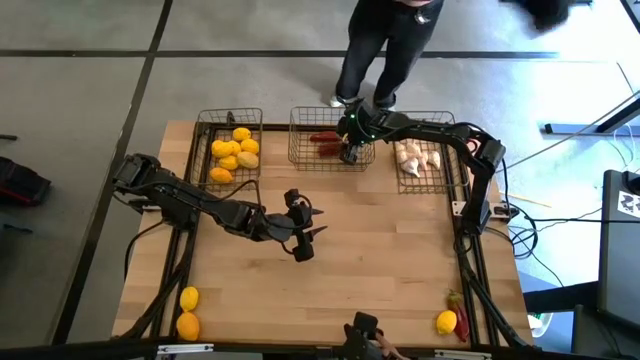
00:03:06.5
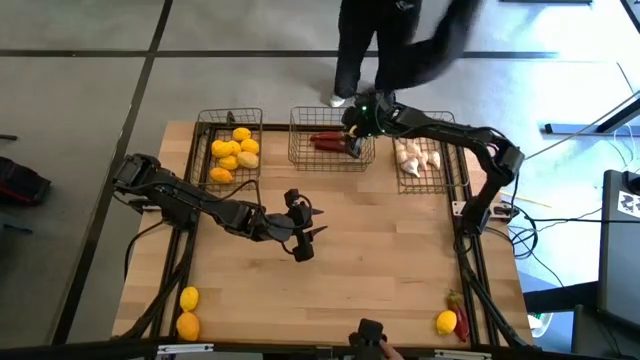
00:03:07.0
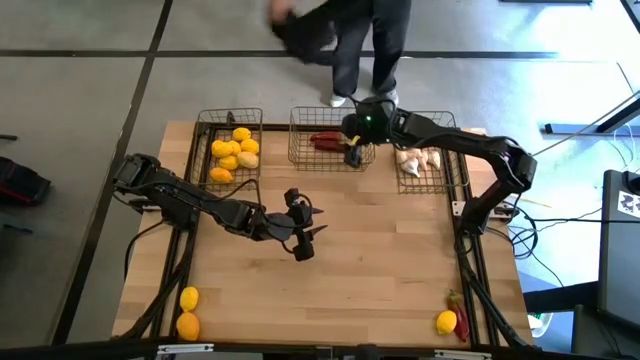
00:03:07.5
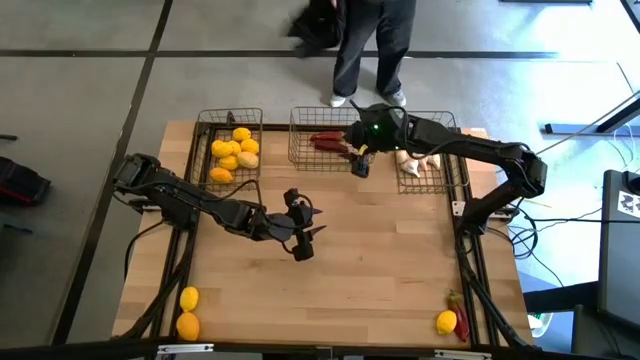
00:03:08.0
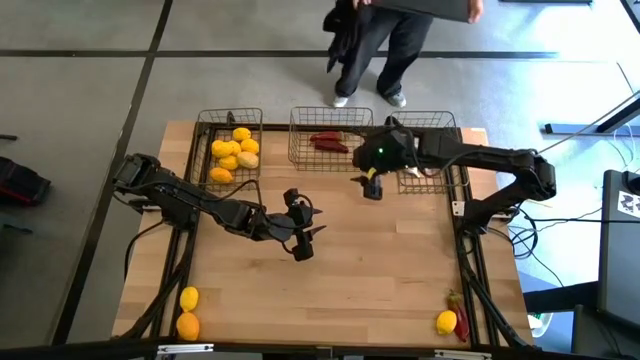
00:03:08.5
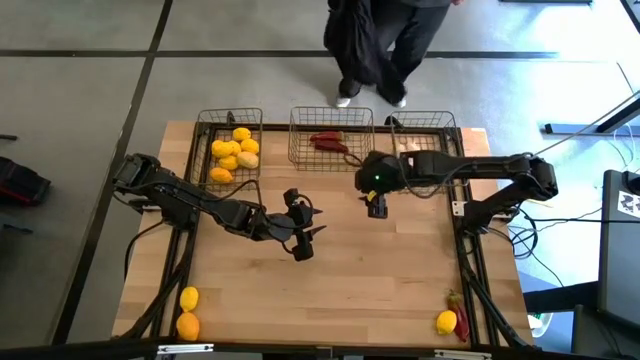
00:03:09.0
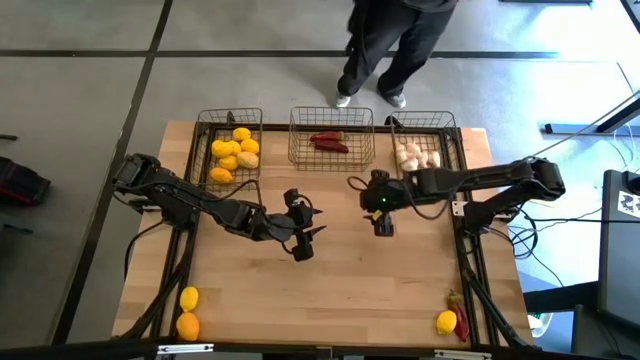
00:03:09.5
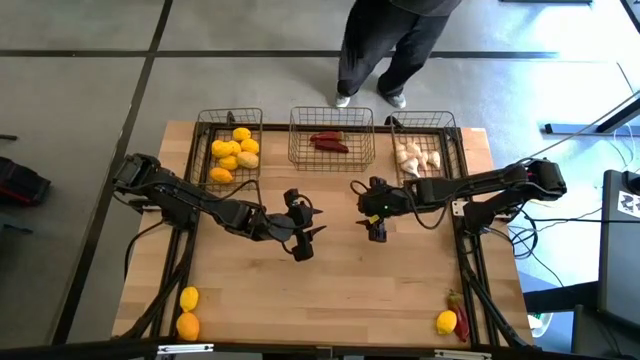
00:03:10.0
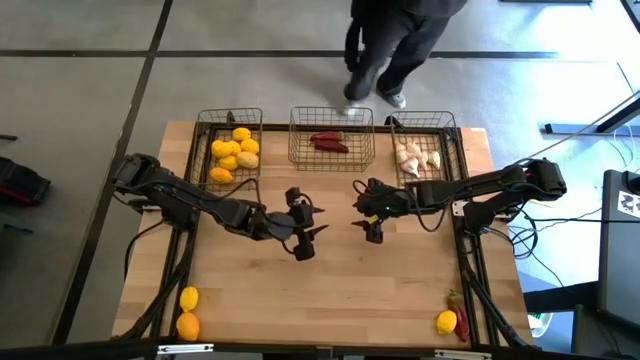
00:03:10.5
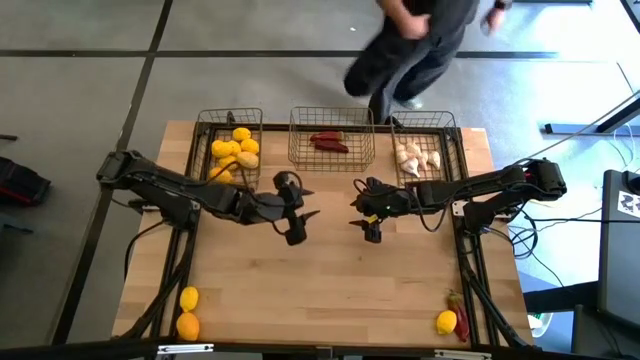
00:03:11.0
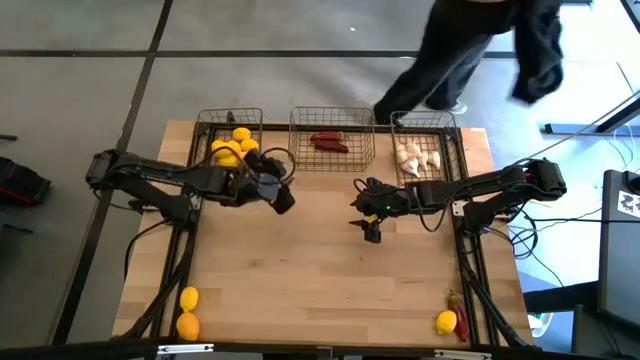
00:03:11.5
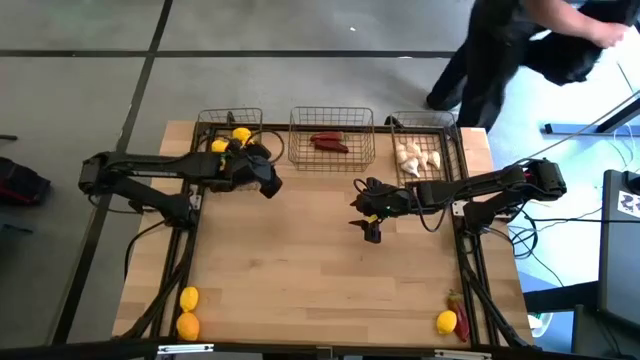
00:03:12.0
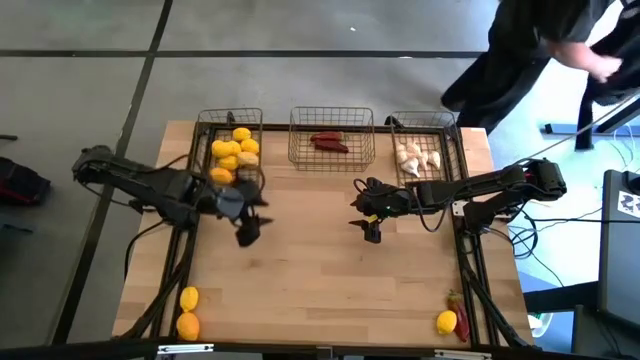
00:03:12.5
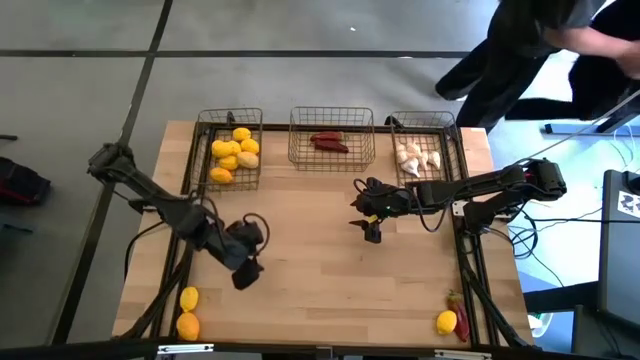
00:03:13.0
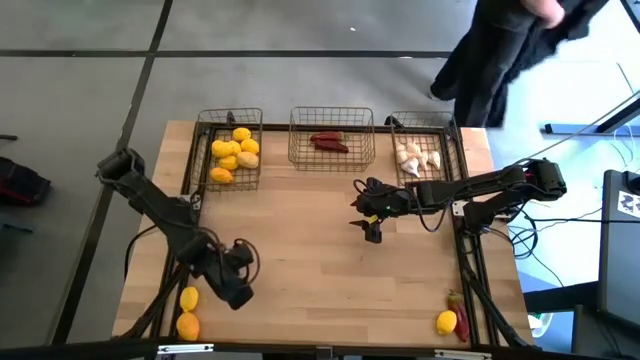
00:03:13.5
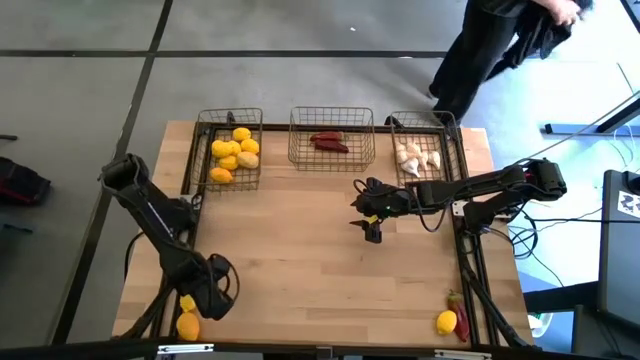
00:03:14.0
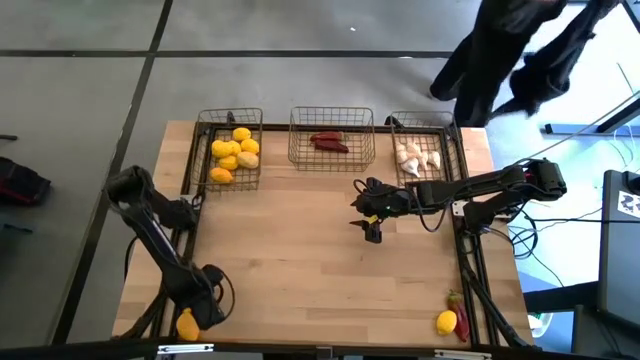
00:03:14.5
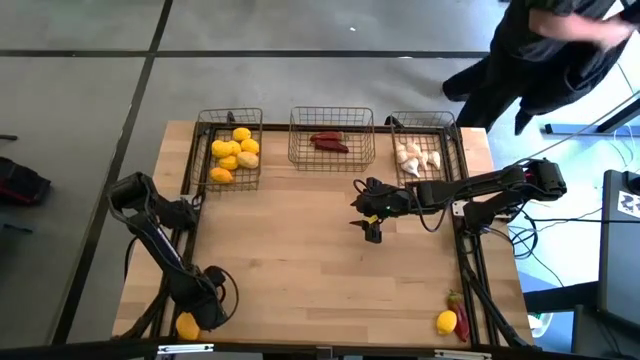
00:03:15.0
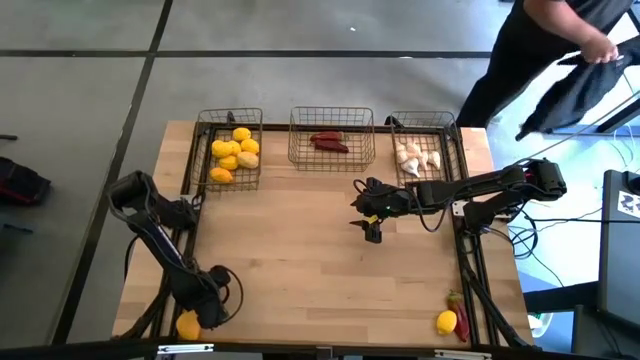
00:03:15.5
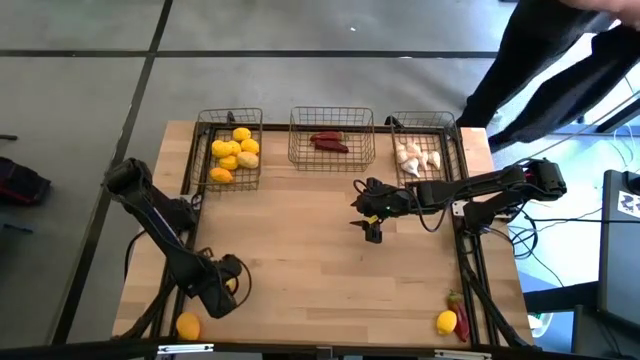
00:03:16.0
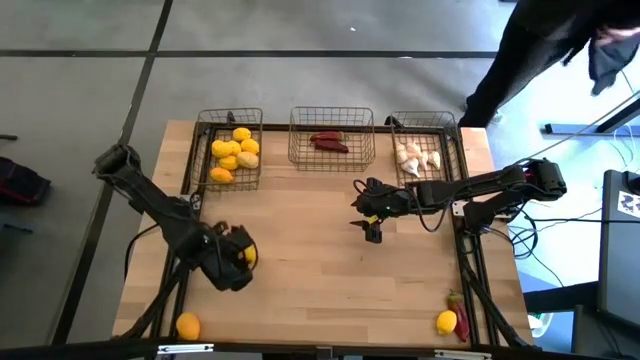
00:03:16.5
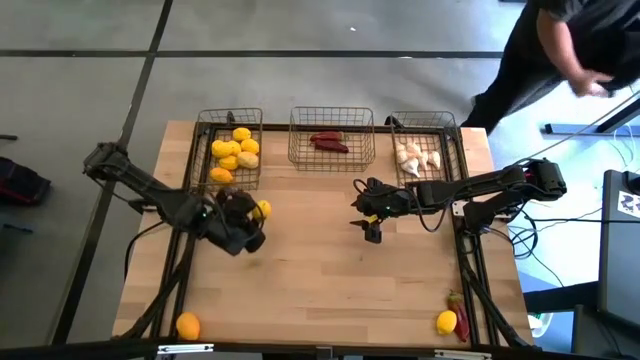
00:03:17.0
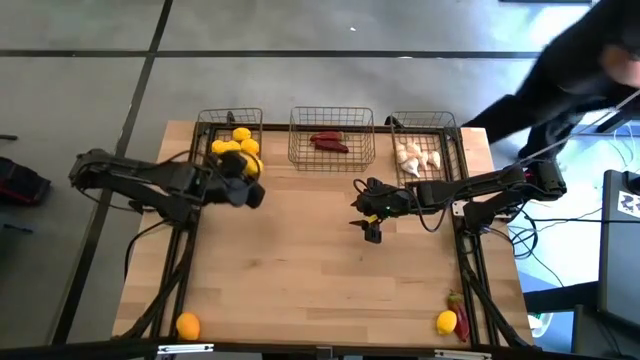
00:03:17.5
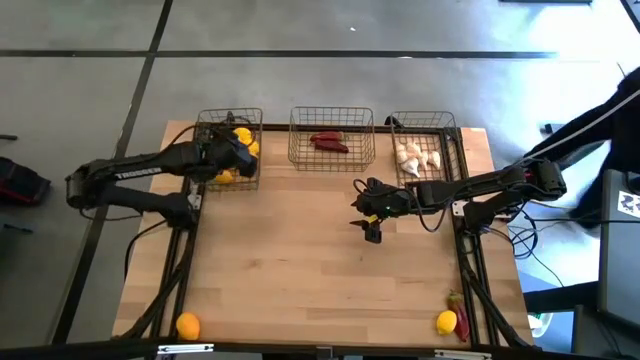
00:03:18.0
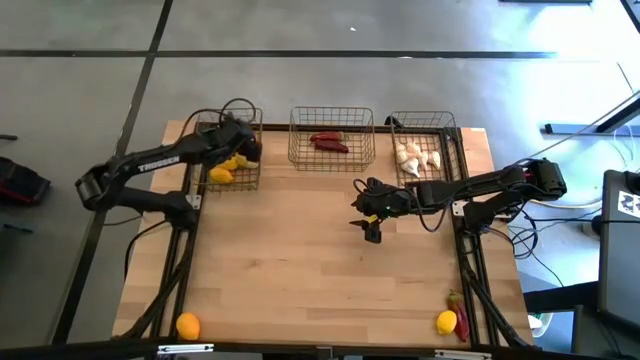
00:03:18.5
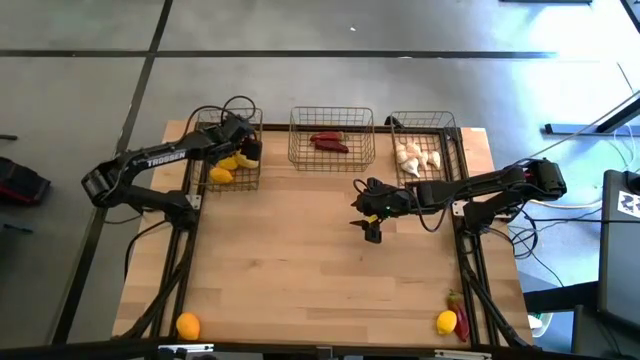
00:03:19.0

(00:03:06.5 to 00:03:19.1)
Task: Sort produce into baskets
Put the yellow lemon into the left gold wire basket

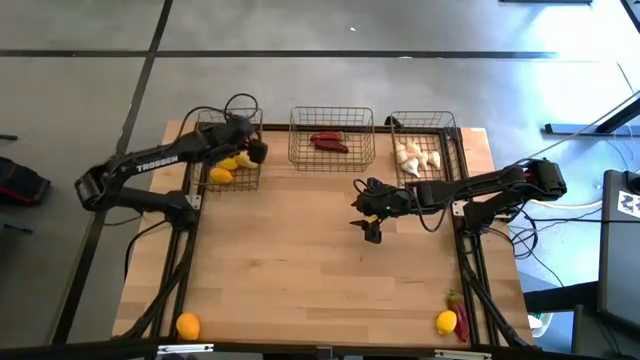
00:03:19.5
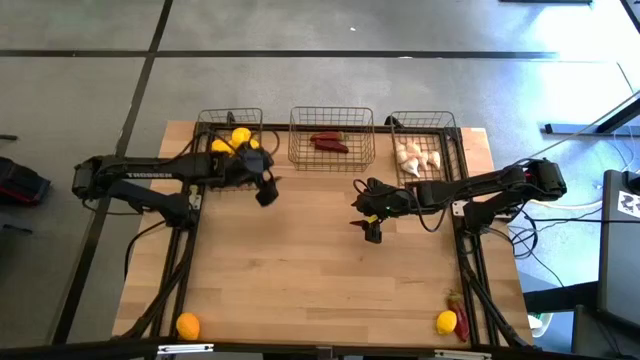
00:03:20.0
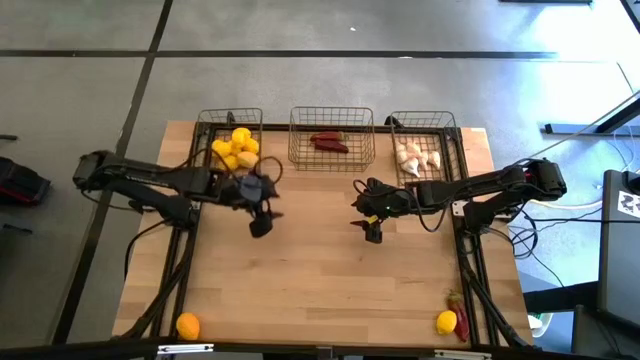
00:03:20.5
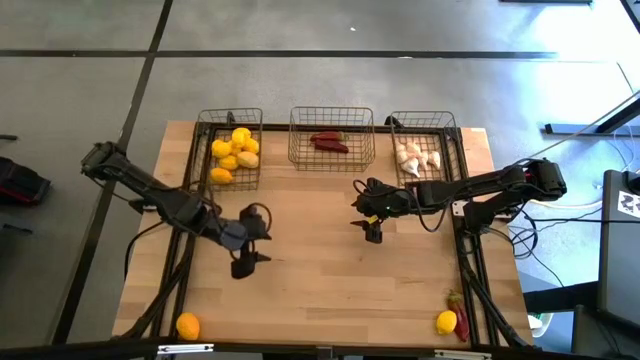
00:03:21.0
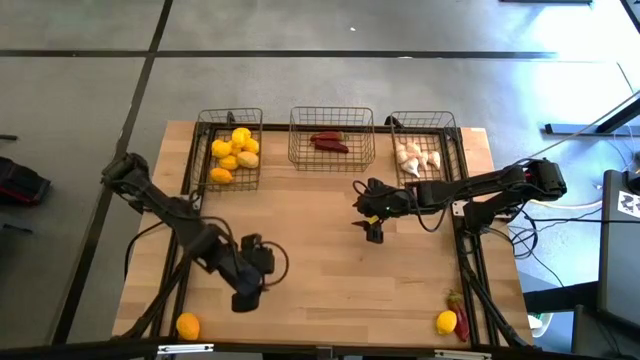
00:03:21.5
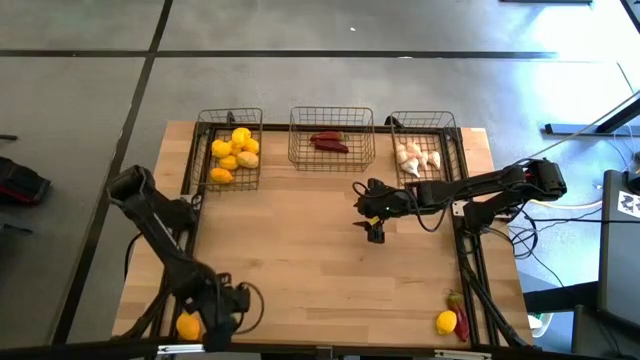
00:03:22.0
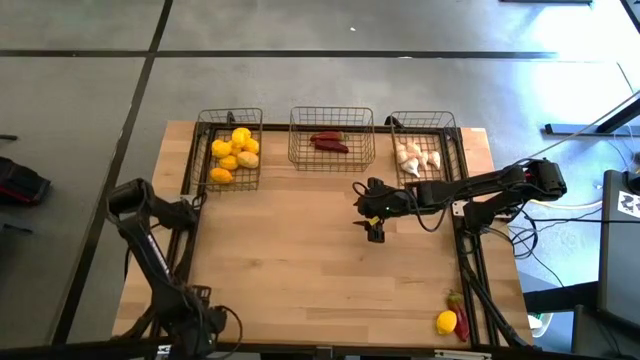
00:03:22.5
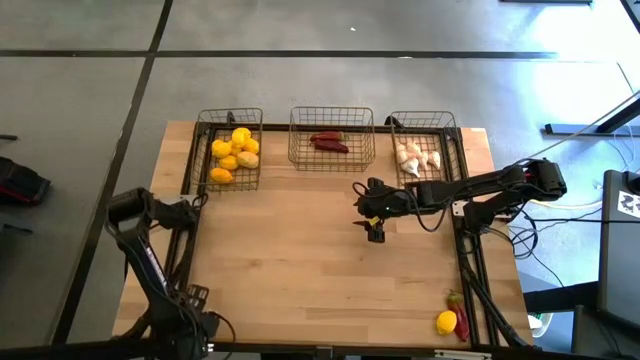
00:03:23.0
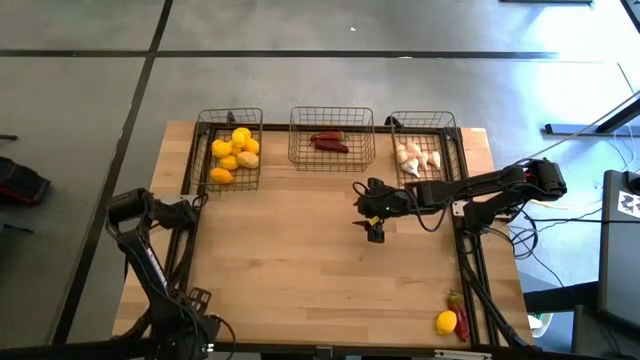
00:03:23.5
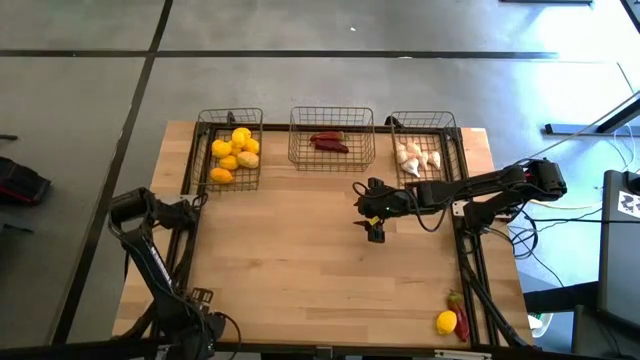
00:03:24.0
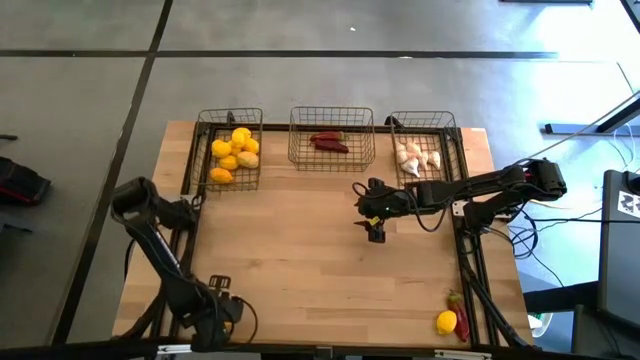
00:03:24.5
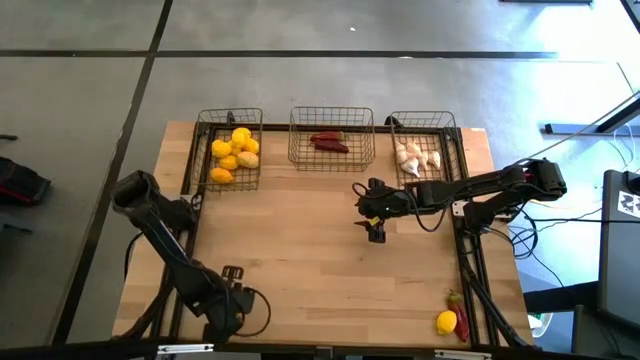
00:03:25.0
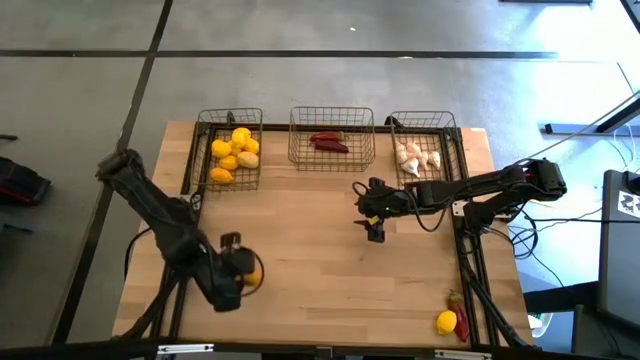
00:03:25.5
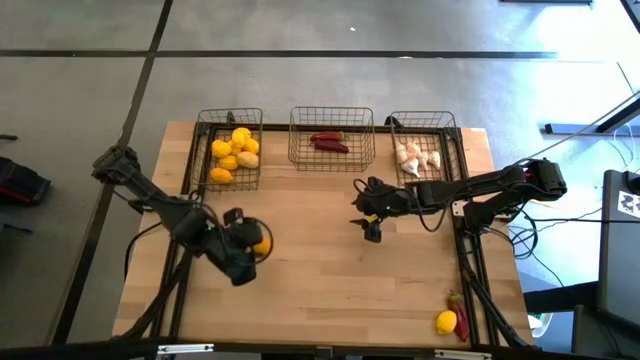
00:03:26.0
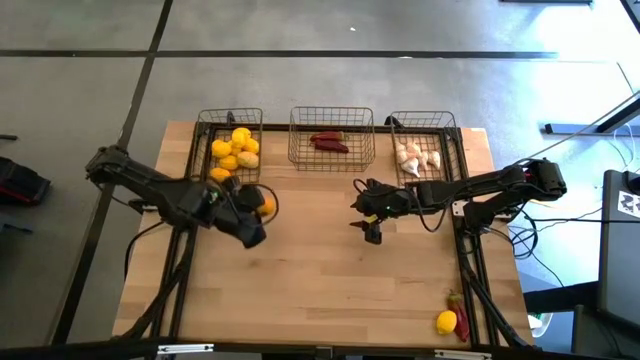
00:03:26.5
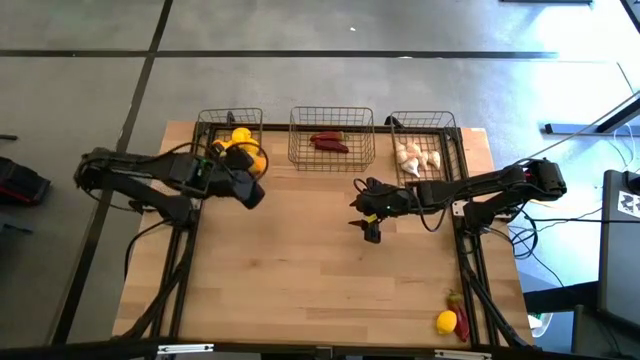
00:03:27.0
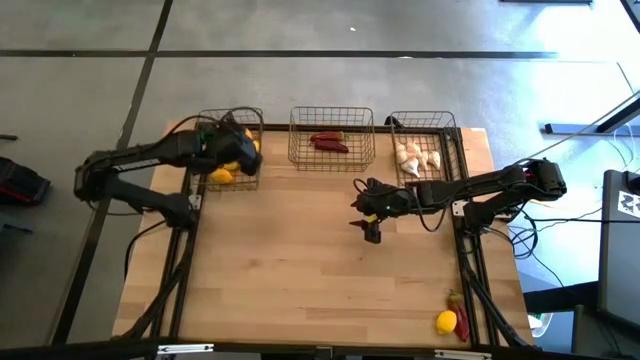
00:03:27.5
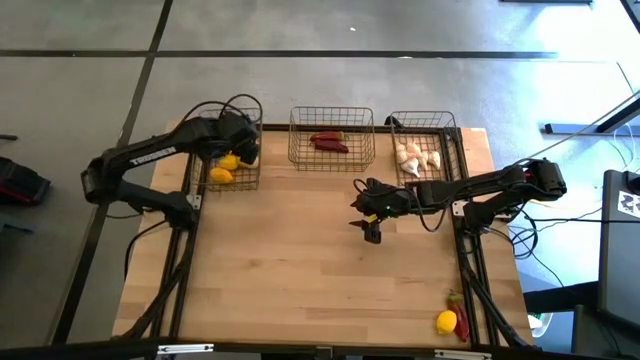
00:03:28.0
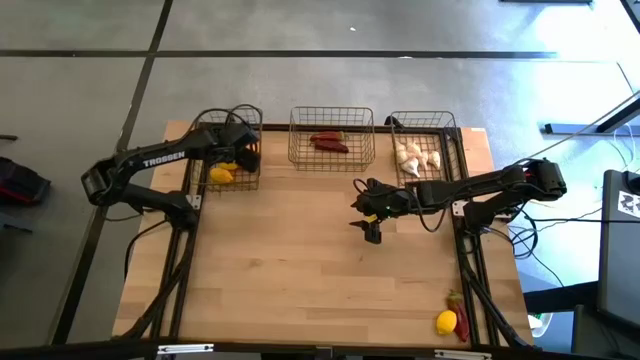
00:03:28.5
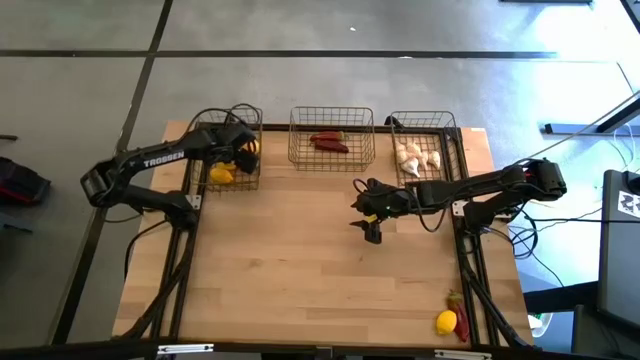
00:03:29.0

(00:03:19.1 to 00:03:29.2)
Put the yellow lemon into the left gold wire basket
